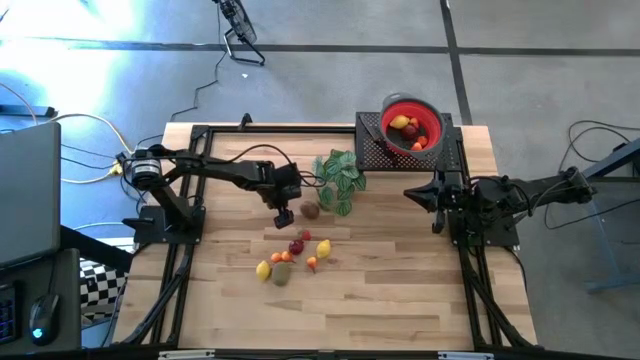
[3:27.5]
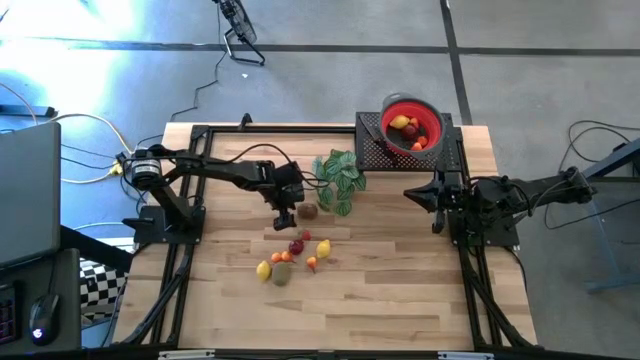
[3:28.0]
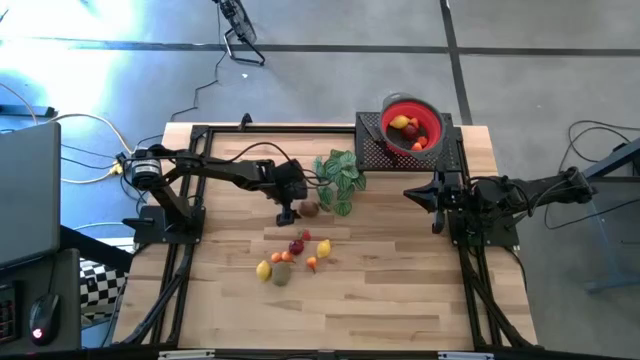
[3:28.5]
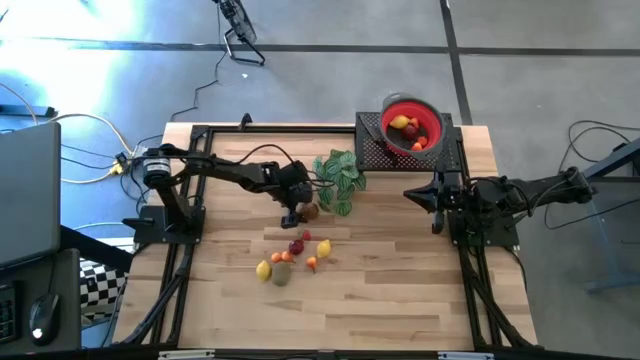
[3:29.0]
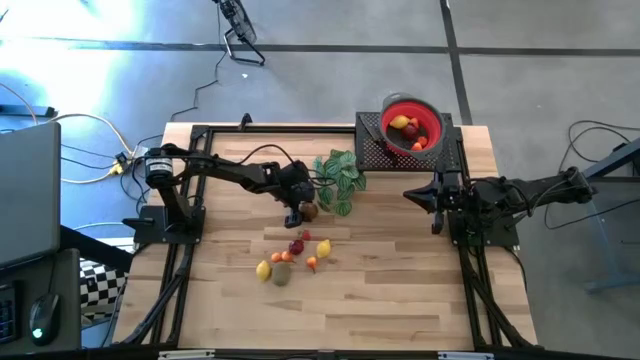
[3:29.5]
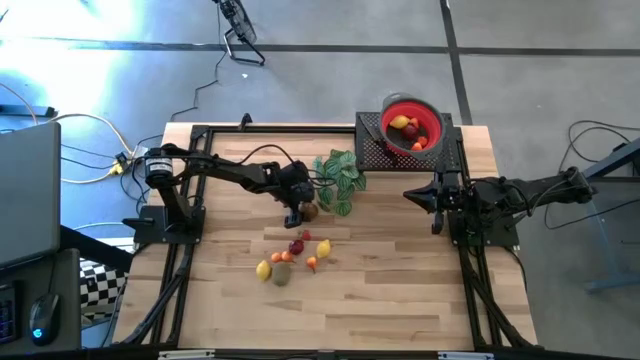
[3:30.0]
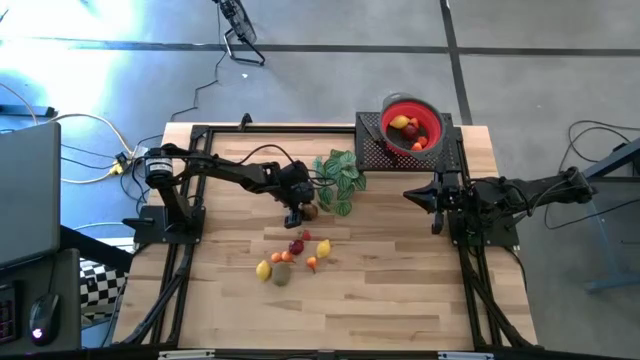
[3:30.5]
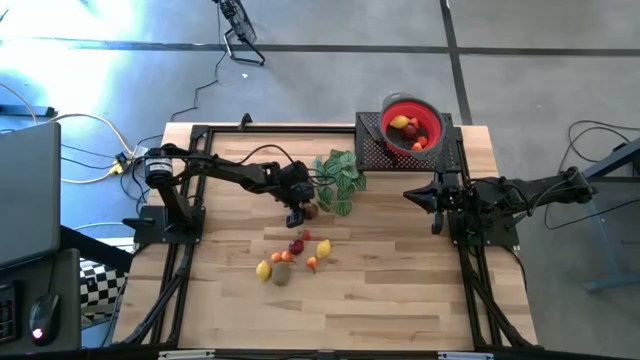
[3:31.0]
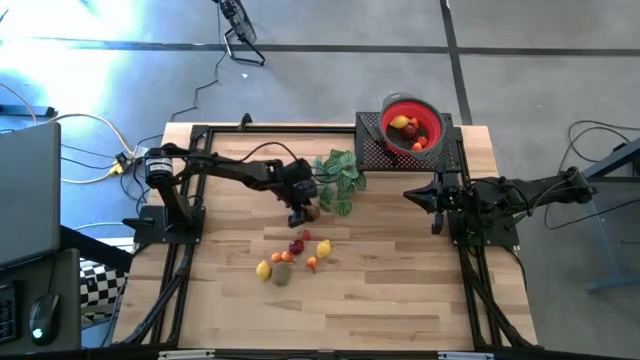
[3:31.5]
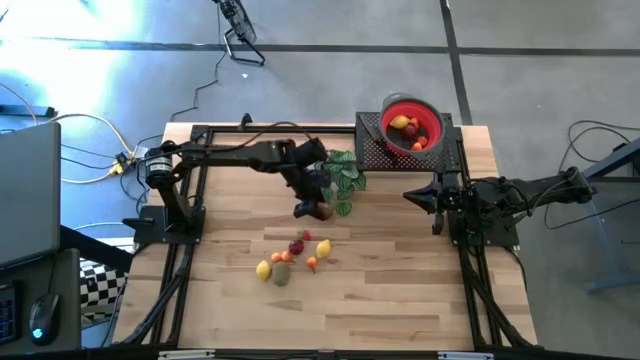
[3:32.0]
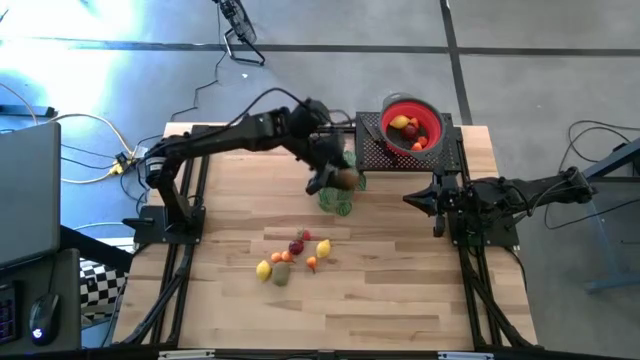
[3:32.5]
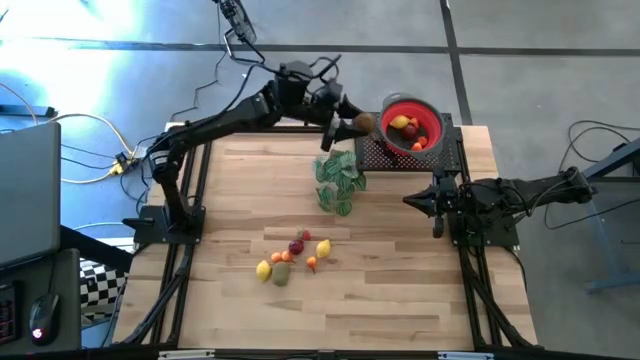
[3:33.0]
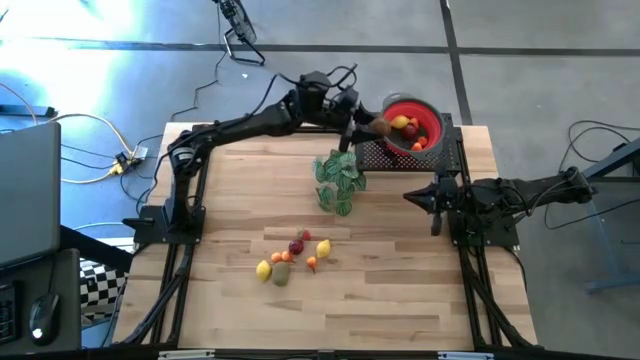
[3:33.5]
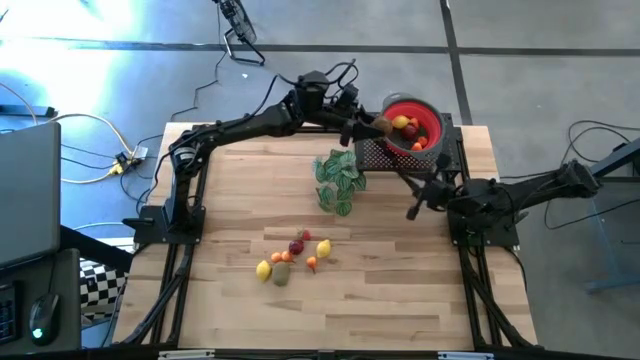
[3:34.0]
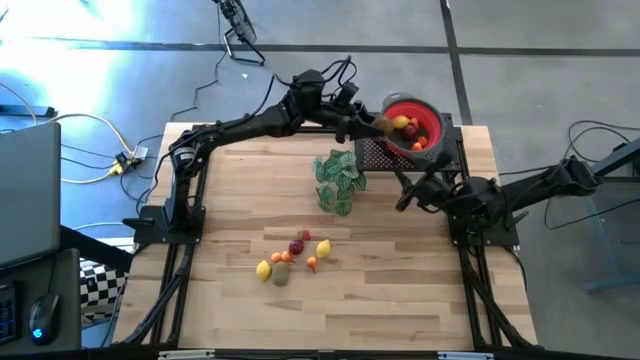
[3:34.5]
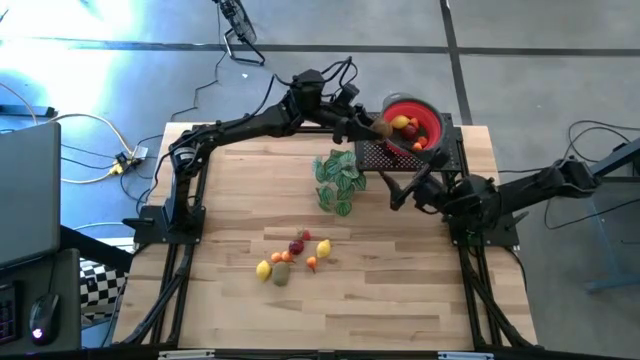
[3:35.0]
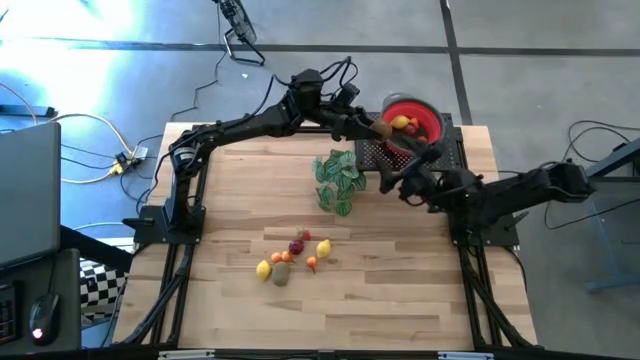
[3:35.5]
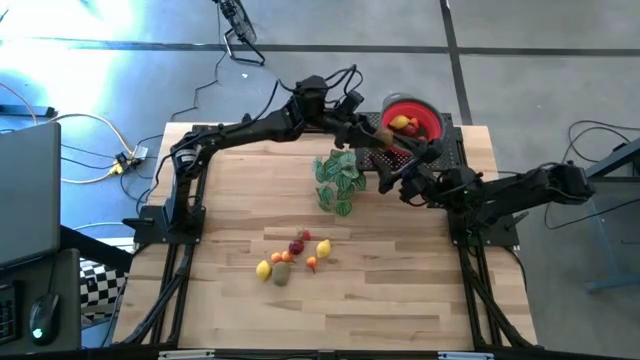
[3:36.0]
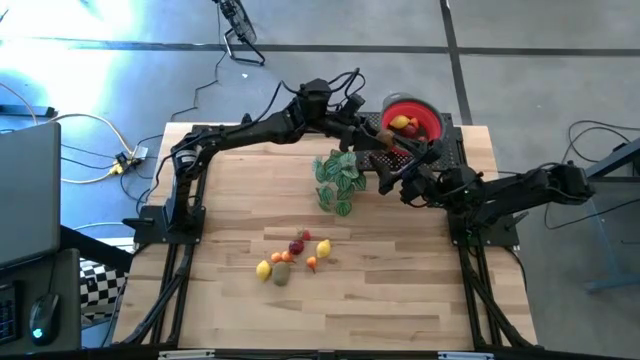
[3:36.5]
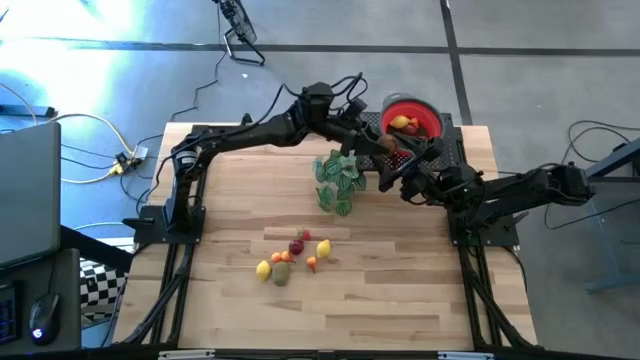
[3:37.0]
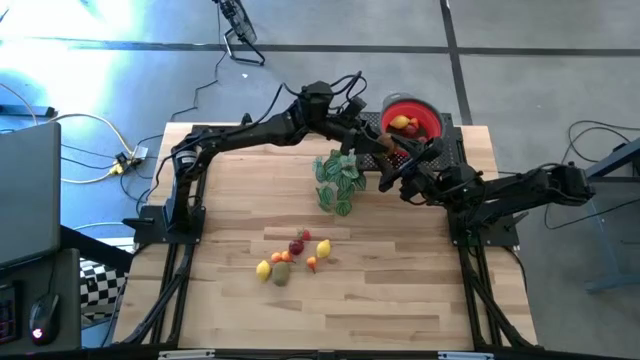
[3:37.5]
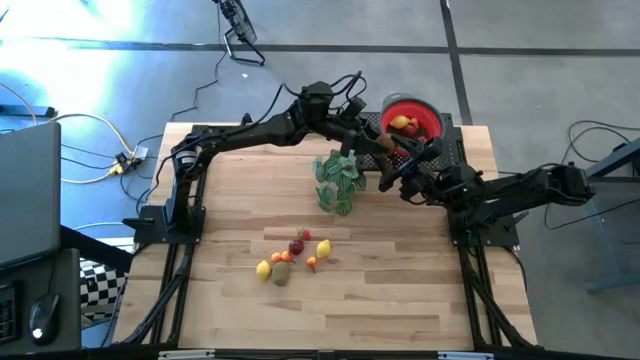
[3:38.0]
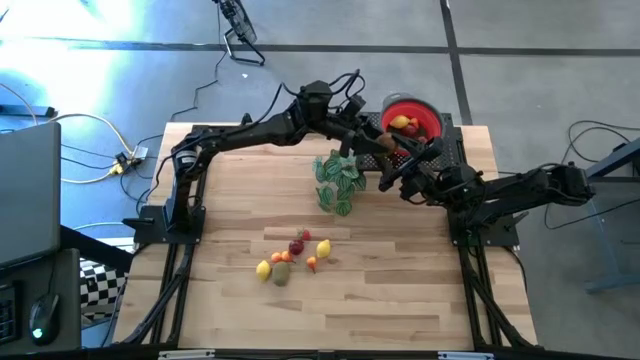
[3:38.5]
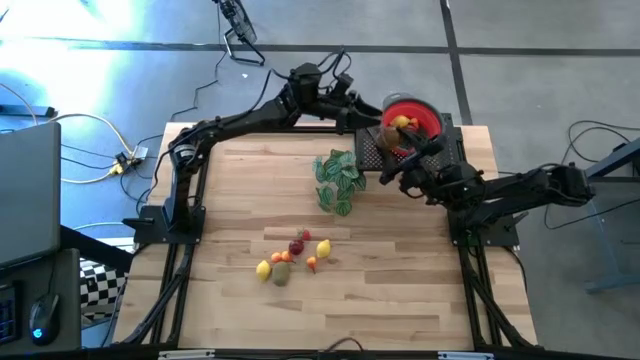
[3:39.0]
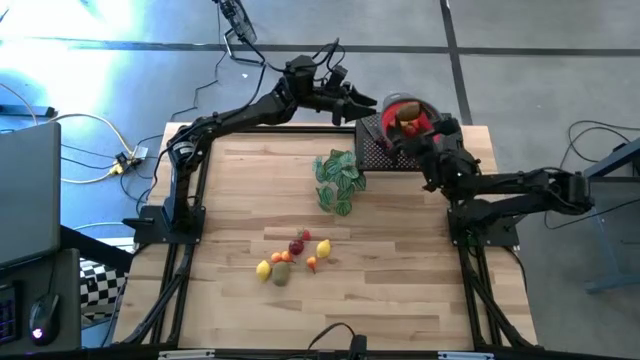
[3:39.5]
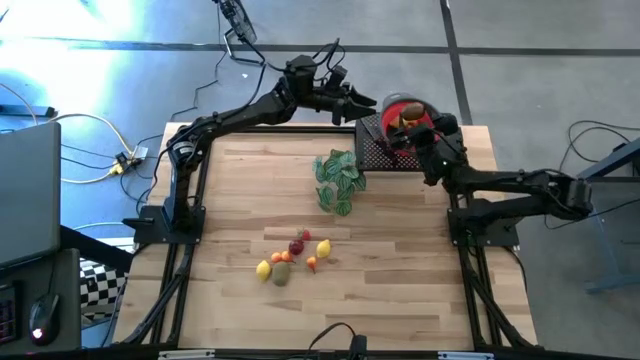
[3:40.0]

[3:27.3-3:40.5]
Task: Pick & Place Fruit
Put the kiwi into the red colander

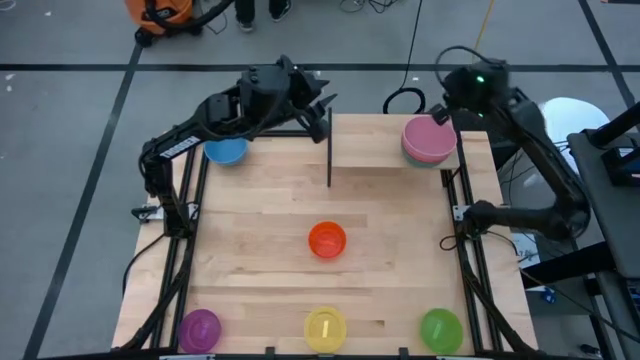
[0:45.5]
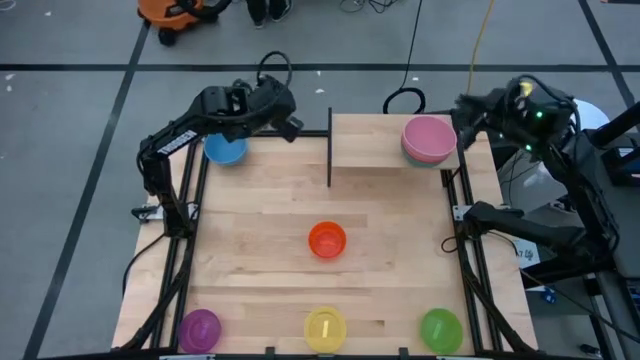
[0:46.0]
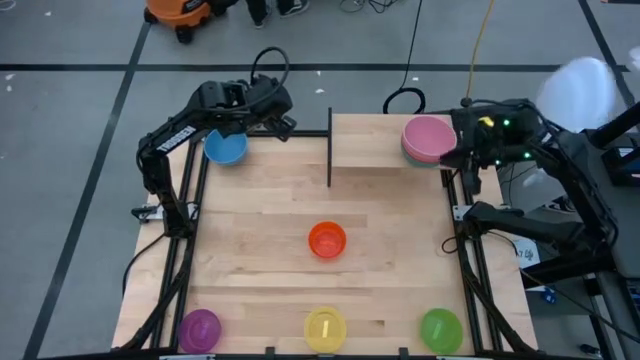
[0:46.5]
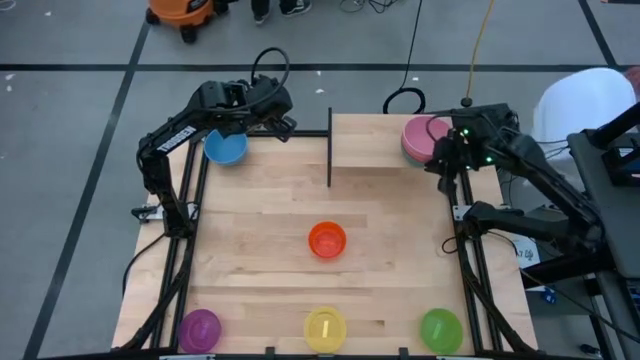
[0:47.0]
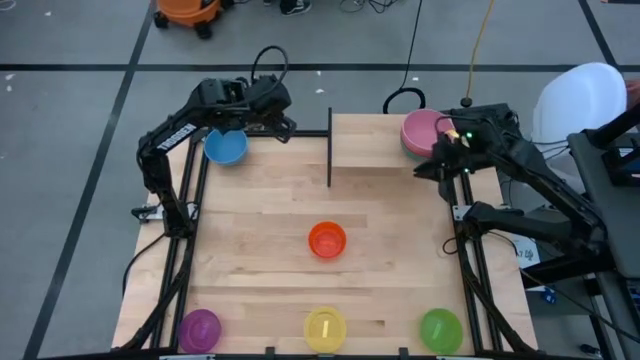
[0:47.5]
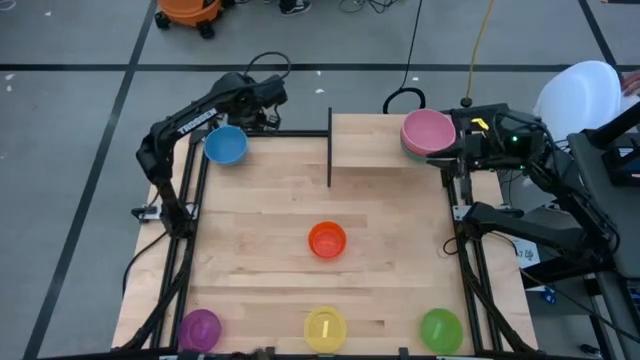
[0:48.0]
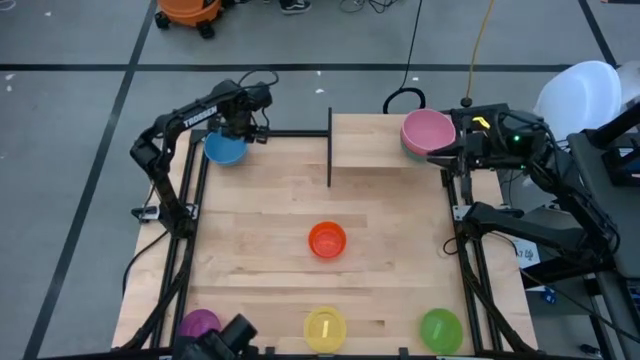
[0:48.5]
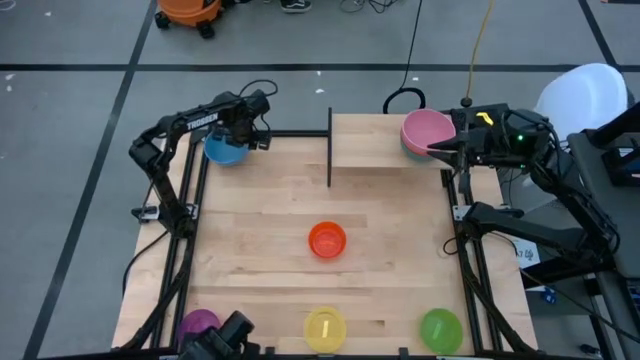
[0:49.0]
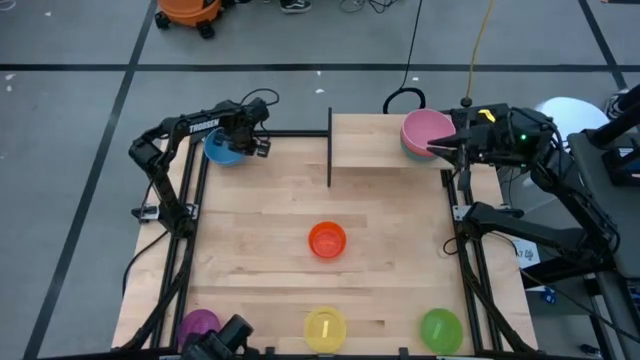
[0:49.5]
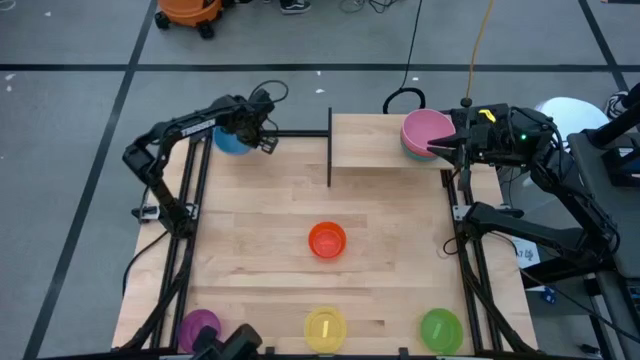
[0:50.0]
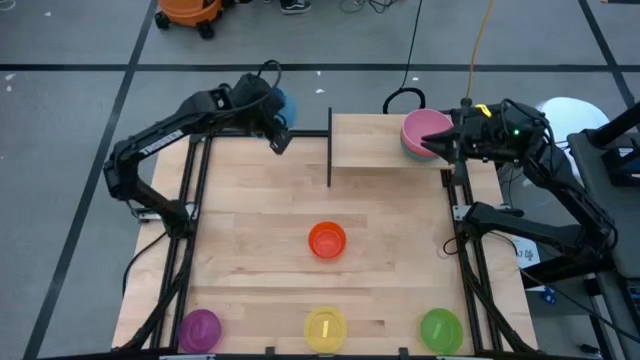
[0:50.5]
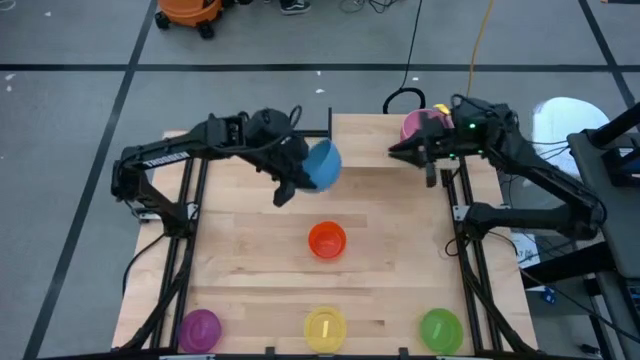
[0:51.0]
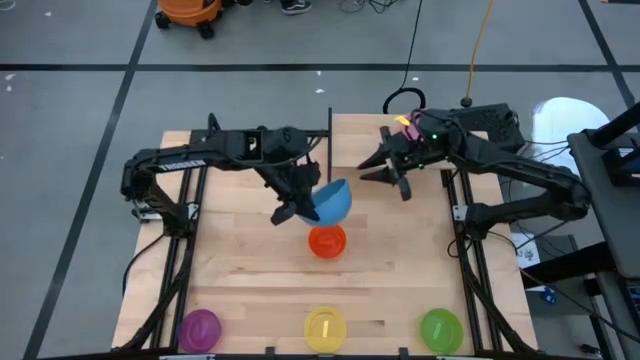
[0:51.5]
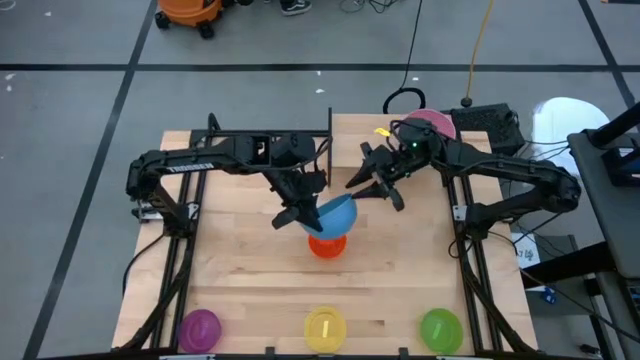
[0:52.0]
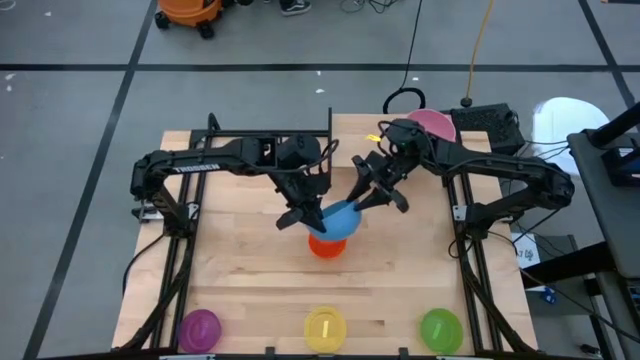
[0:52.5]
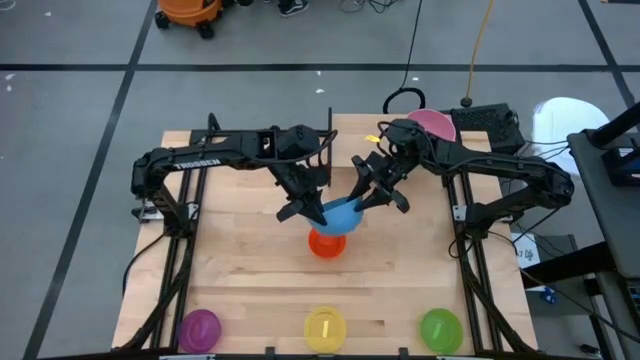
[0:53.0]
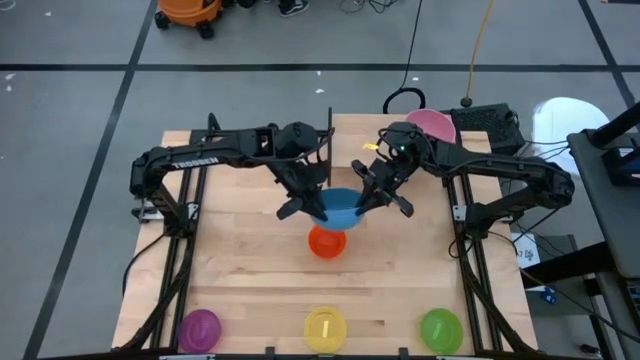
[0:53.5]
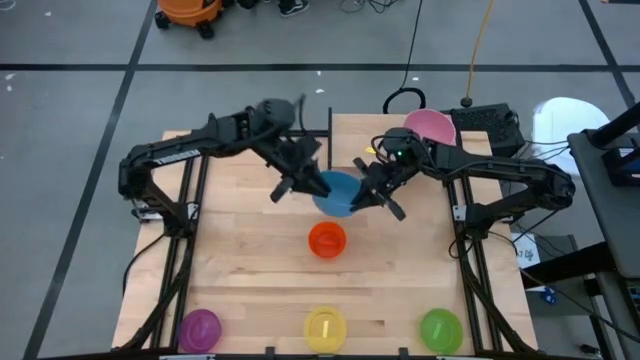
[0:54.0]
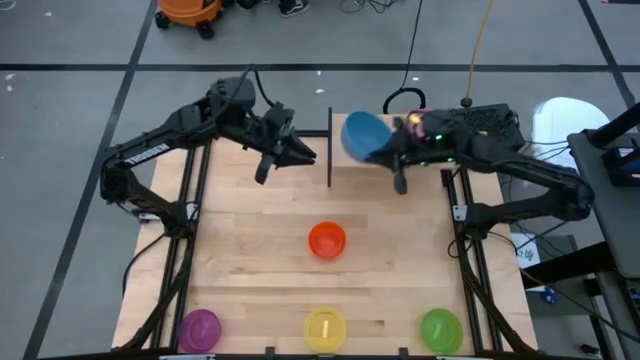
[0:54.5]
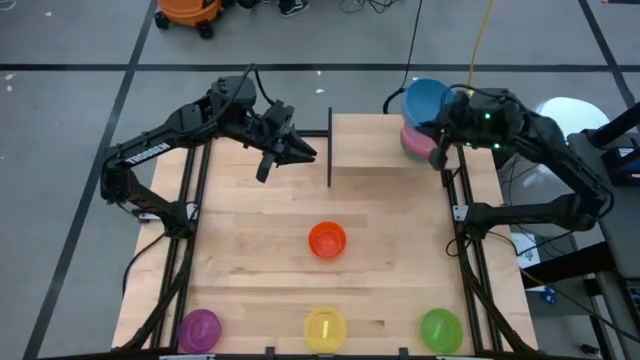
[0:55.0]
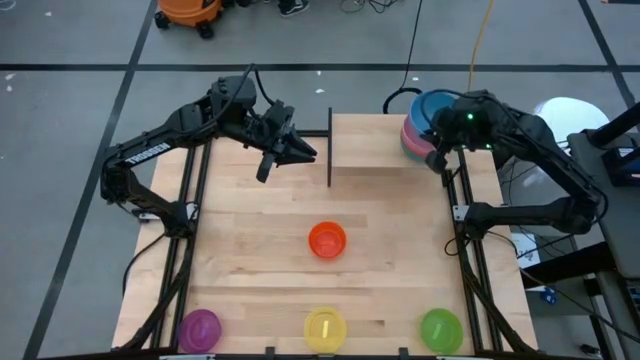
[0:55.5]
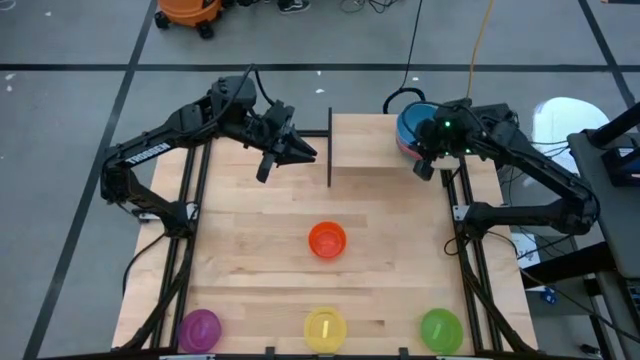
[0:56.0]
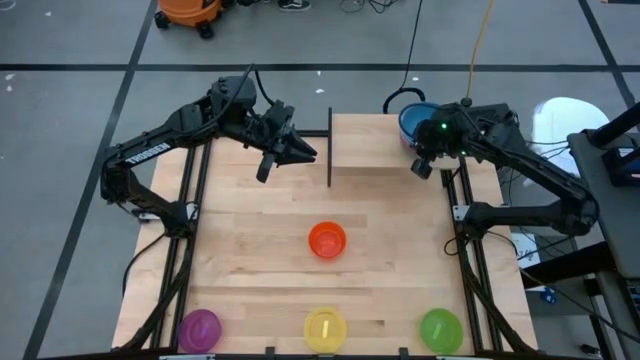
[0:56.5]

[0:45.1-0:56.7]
Task: Place and stack bowls onto a shelf
Stack the blue bowl inside the pink bowl on the shelf
